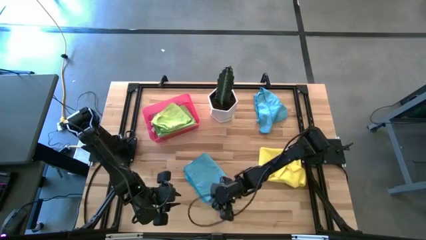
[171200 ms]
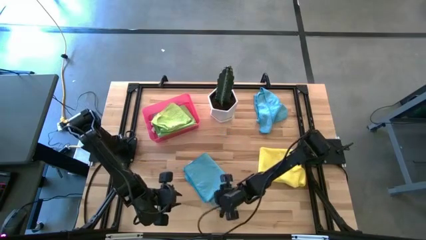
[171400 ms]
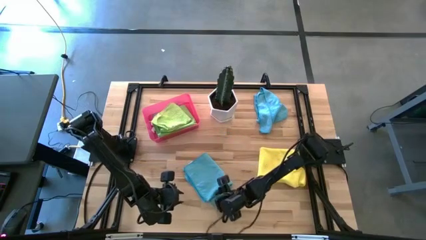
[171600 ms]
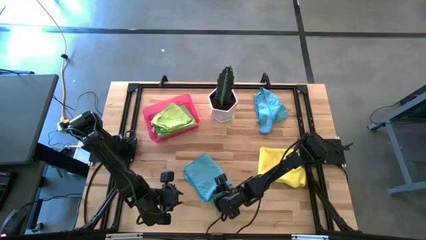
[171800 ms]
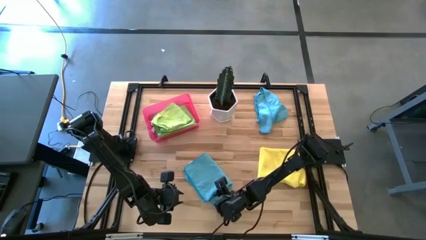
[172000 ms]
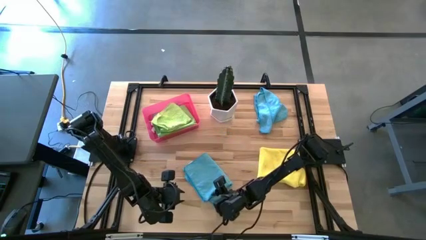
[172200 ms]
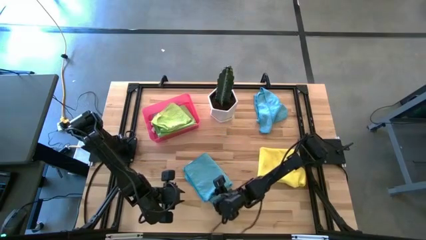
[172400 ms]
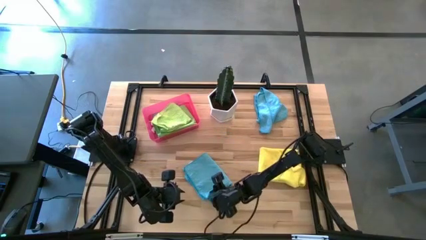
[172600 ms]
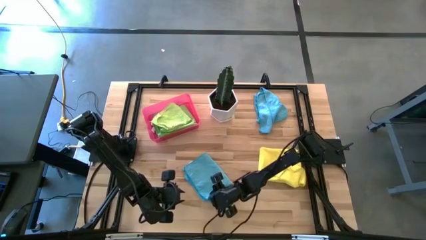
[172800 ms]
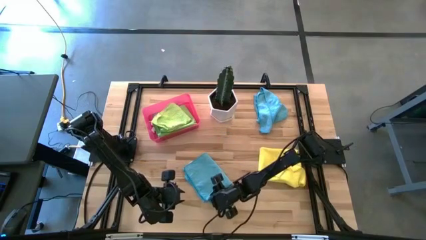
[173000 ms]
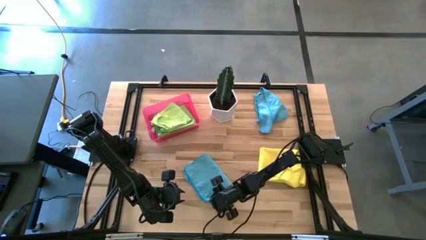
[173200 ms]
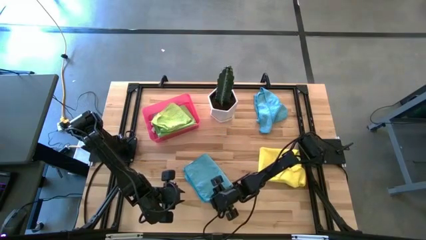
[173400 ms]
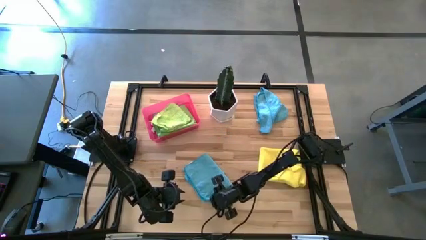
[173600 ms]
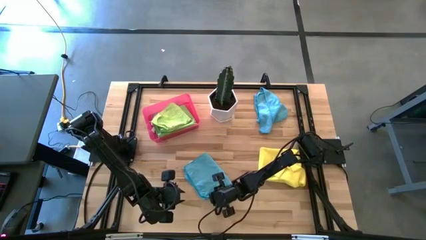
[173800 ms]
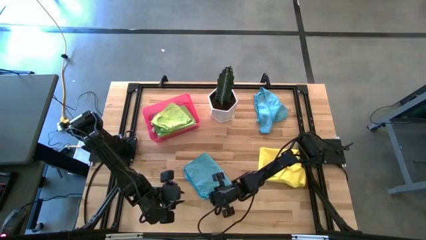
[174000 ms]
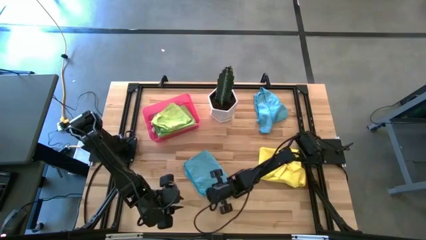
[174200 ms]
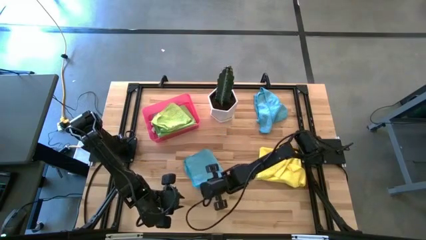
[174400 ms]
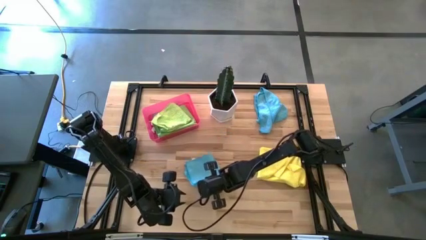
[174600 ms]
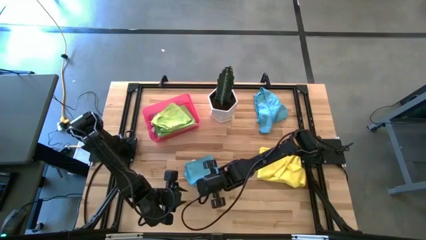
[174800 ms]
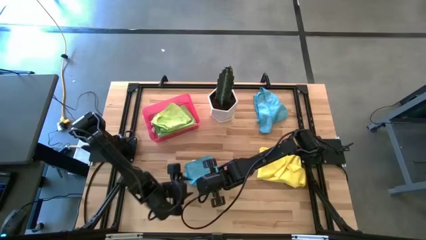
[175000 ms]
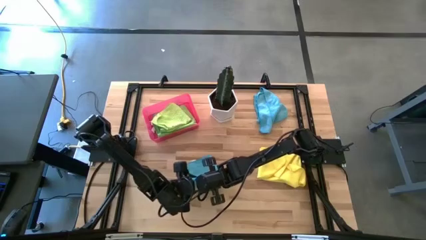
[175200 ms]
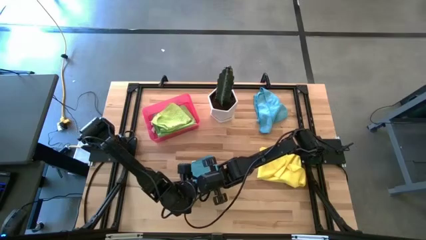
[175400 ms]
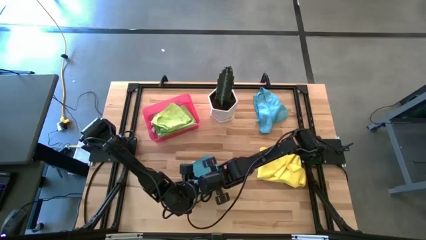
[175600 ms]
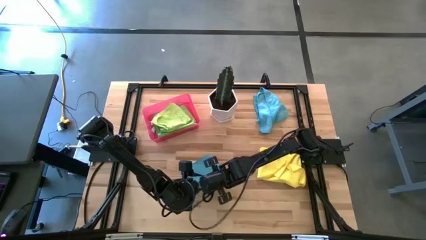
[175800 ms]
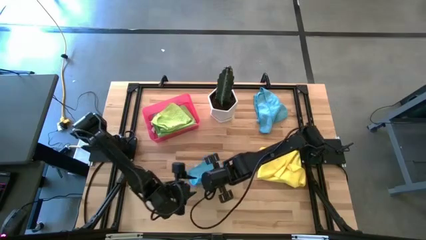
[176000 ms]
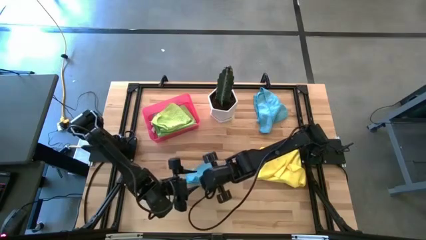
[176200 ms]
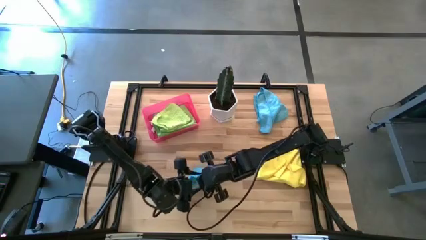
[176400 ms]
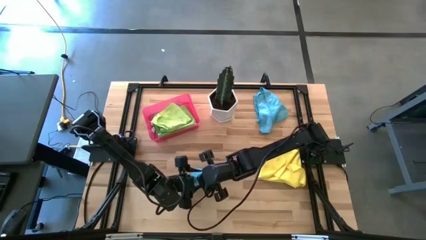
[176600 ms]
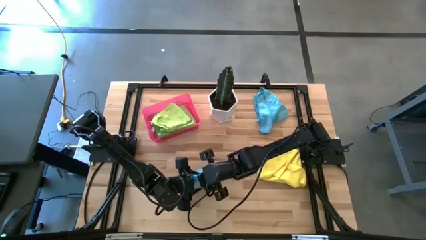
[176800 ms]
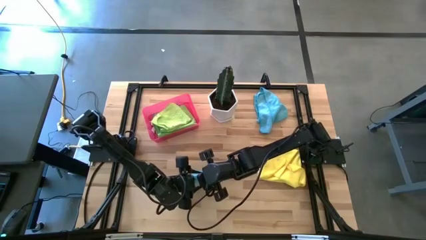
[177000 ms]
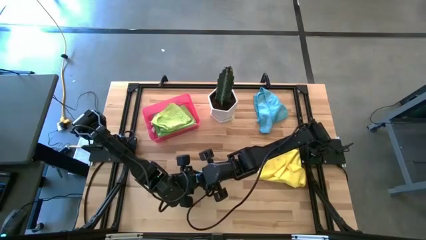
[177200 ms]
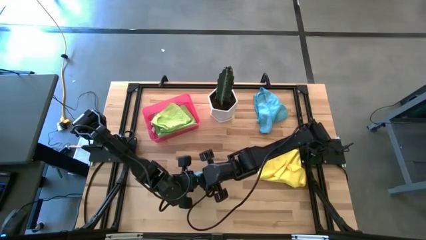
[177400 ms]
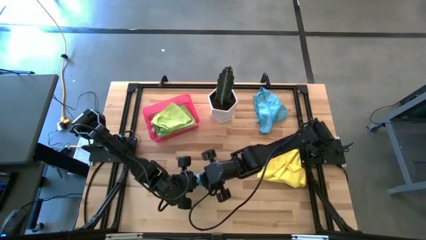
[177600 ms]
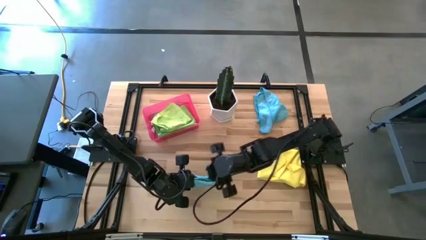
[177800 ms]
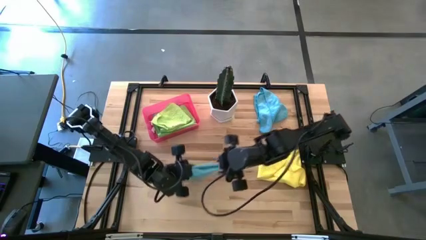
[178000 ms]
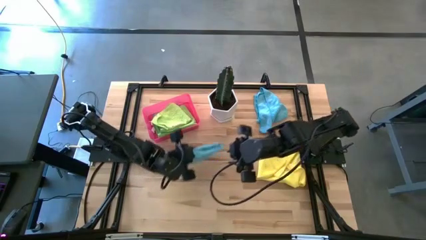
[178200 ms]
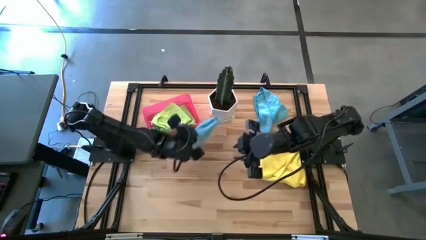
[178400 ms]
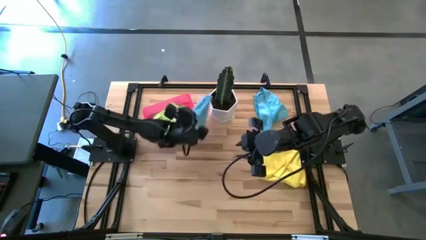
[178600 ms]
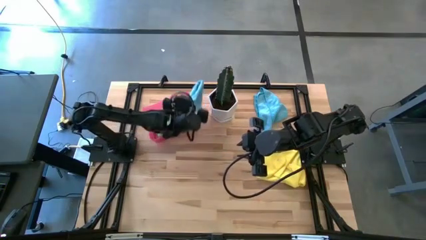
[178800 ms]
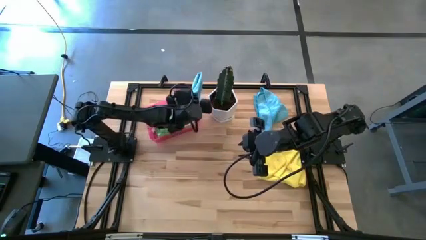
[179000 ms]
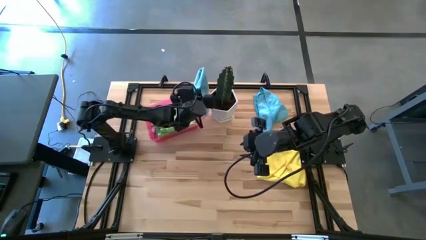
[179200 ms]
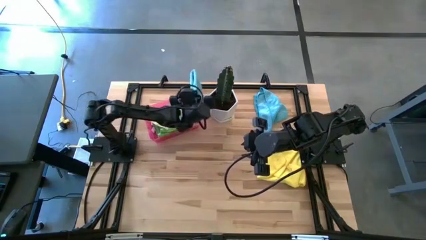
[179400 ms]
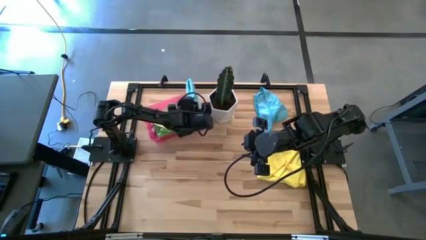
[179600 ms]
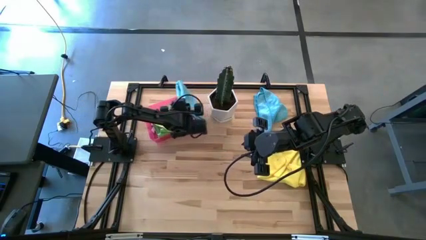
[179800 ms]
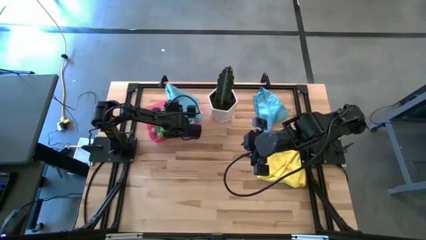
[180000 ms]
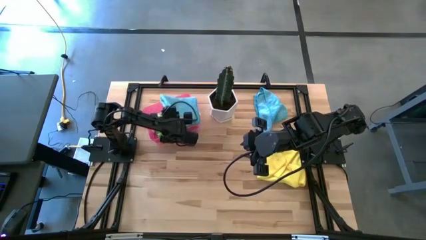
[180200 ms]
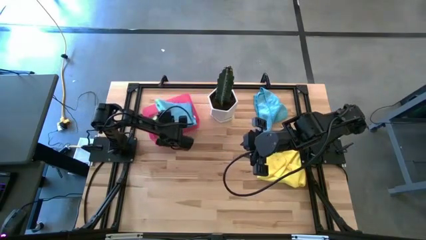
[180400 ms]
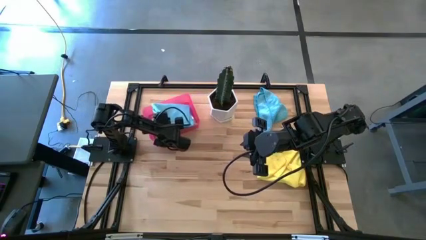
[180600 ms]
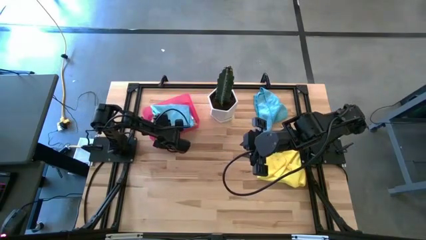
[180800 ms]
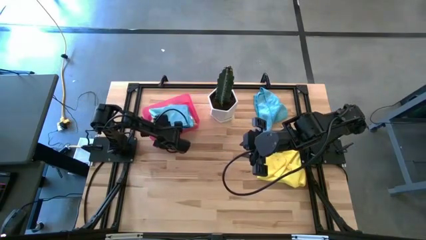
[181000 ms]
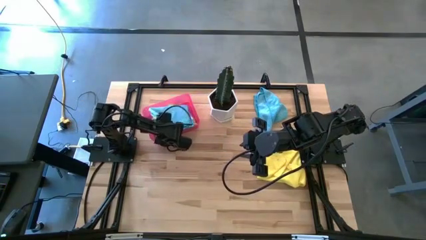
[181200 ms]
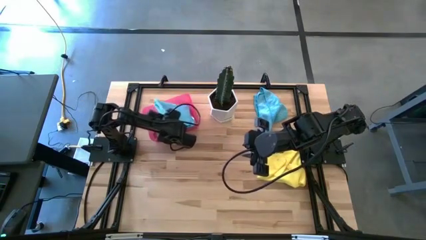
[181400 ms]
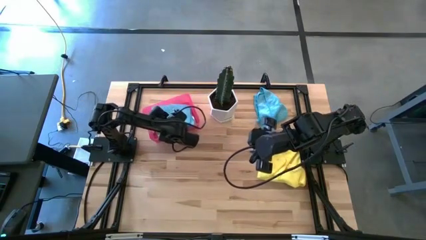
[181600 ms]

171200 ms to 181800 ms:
Task: Fold microfiber towels
Put the folded bottom blue microfiber cloth into the transparent pink bin

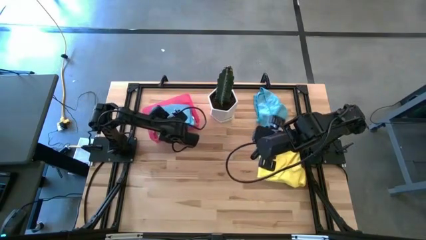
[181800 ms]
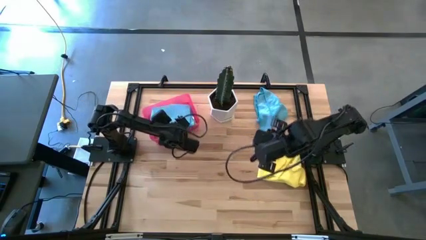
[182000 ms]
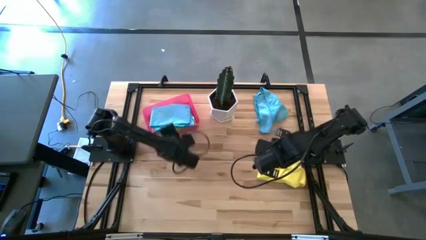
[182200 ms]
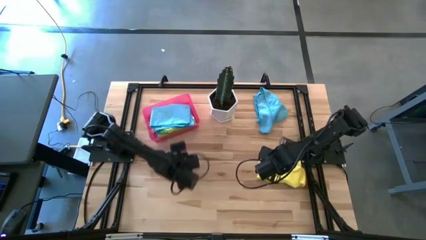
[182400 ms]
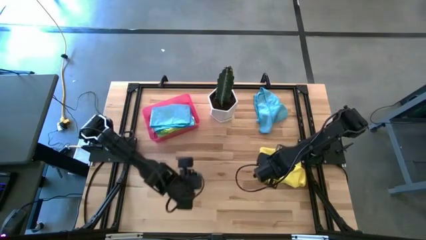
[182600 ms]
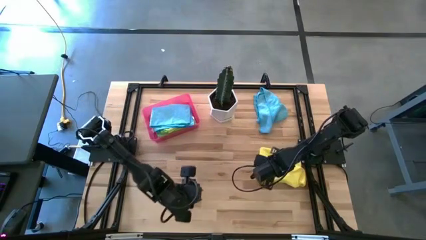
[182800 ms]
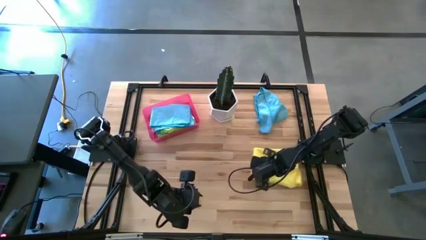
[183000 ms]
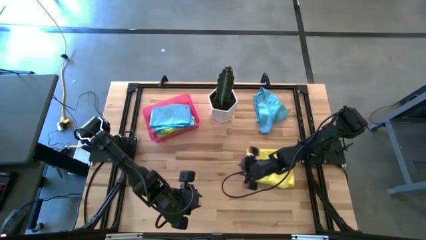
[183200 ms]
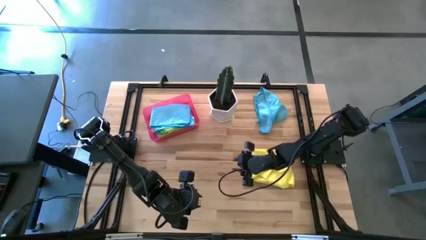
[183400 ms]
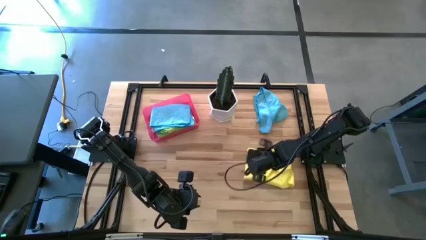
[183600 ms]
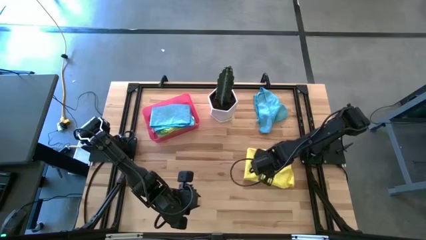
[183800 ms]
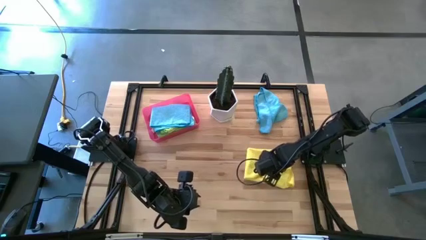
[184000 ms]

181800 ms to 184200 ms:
Fold the yellow microfiber cloth

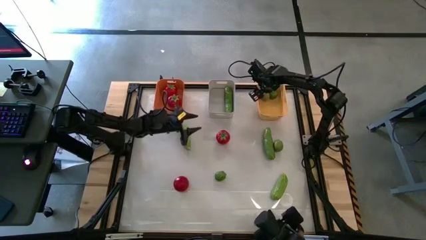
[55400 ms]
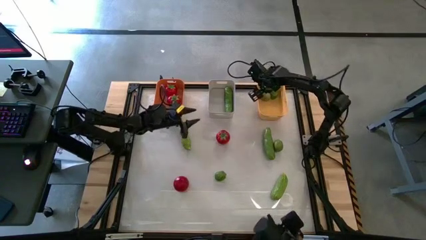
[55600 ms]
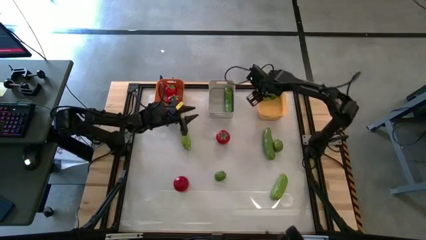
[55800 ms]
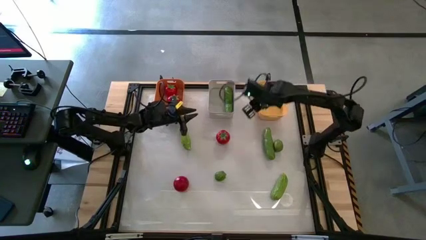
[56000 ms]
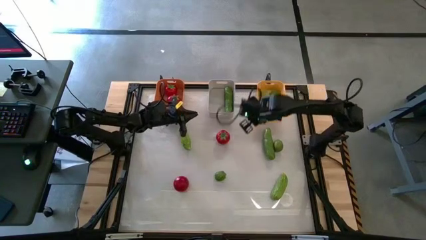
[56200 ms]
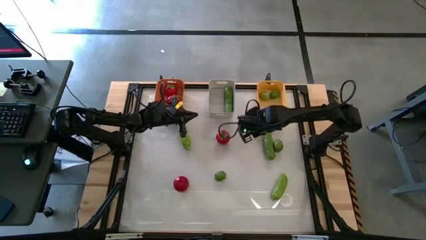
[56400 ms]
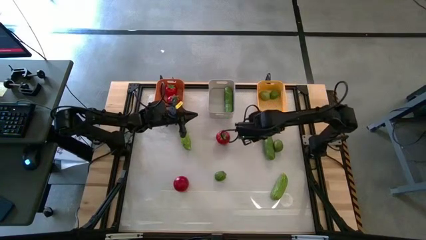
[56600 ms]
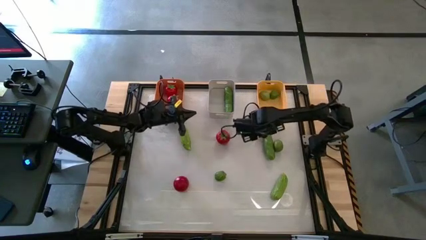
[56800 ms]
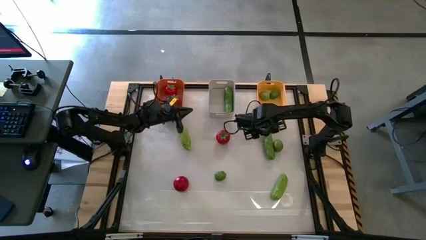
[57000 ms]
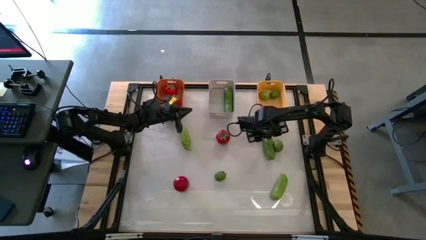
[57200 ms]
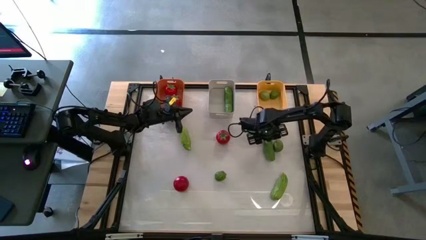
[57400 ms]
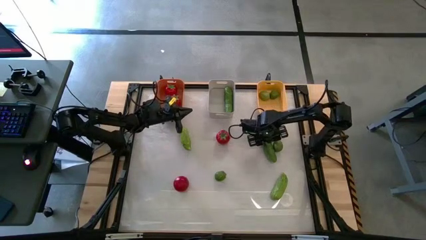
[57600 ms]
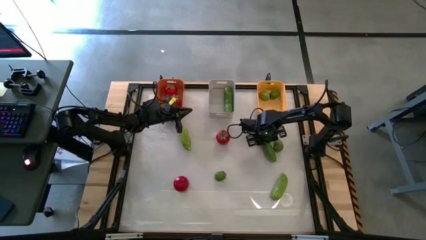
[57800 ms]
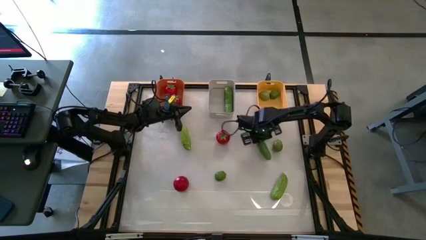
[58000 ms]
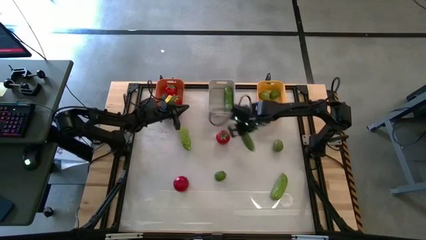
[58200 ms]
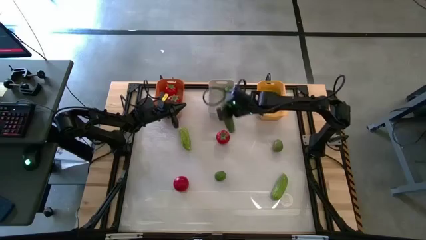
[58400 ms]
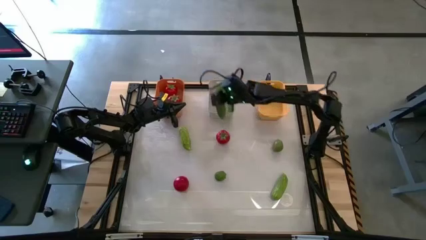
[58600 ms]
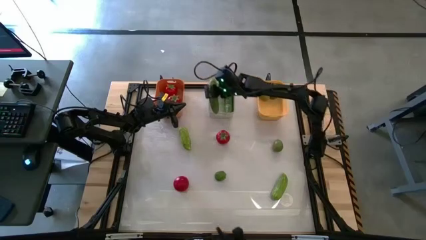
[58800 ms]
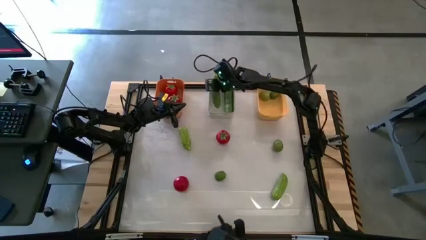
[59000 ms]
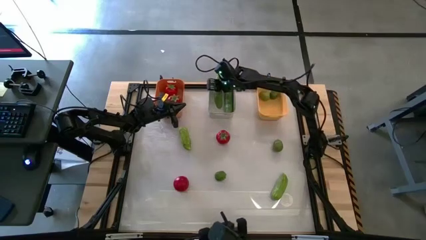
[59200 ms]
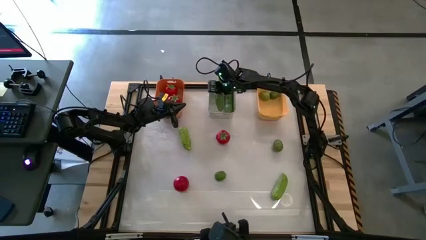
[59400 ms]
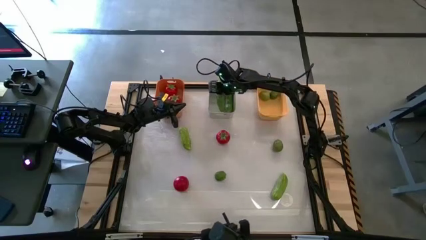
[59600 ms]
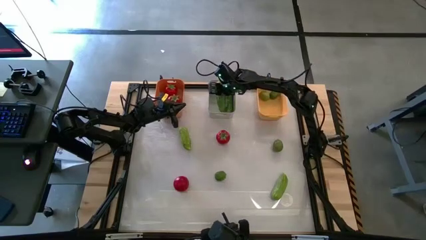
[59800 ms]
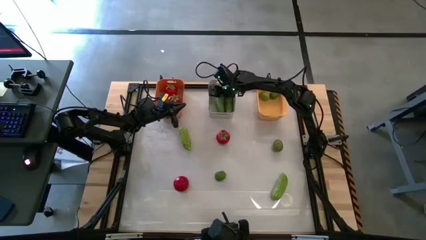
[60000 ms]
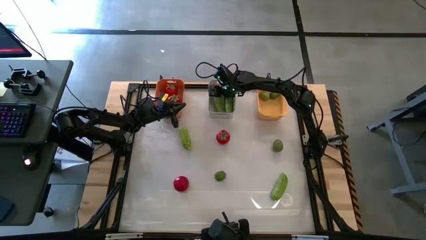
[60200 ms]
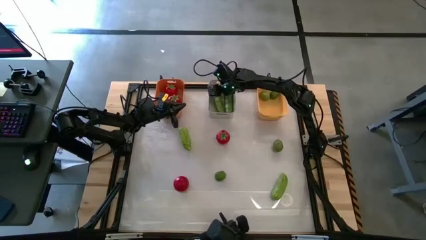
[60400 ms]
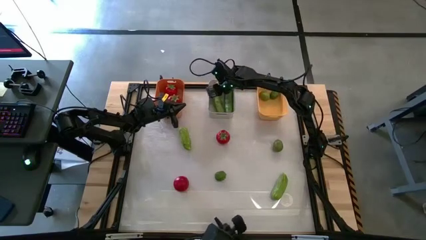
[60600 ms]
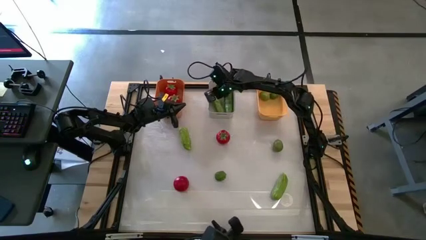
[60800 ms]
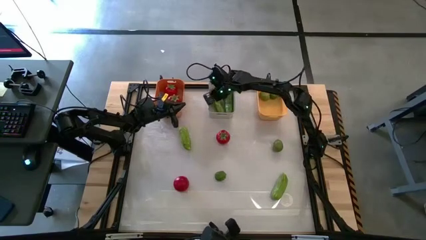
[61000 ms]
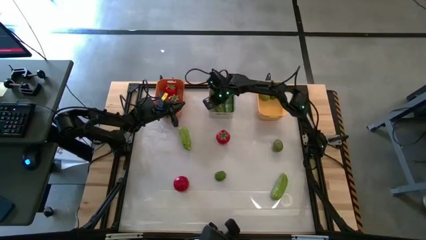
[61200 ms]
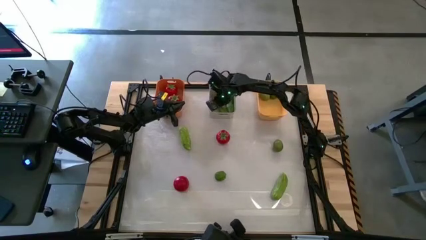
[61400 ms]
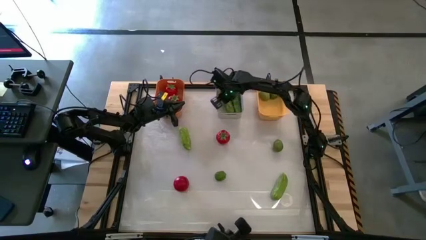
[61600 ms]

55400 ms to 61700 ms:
Task: Sort produce into baskets
Put the top right cucumber into the gray bin
